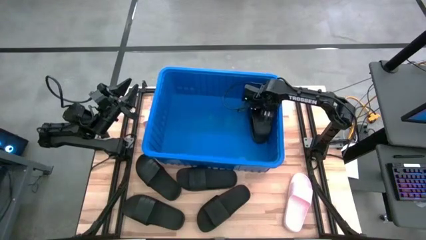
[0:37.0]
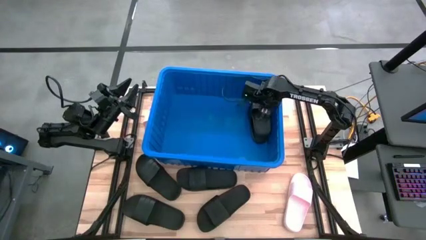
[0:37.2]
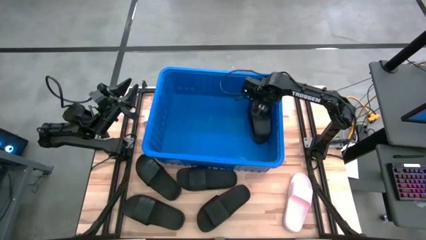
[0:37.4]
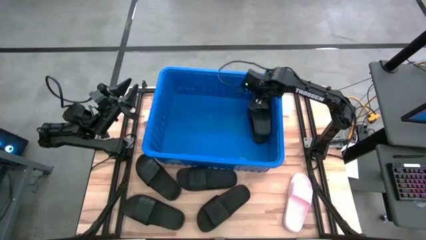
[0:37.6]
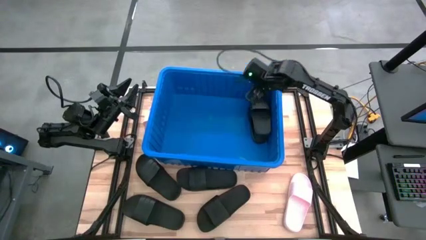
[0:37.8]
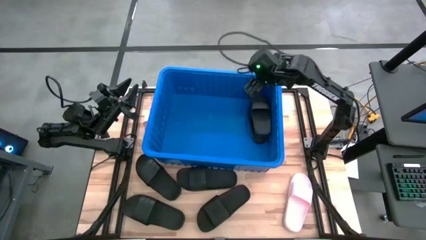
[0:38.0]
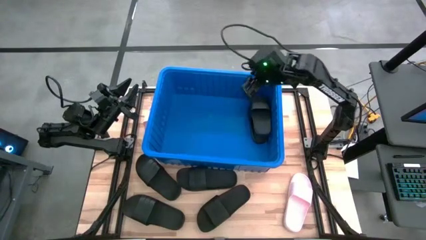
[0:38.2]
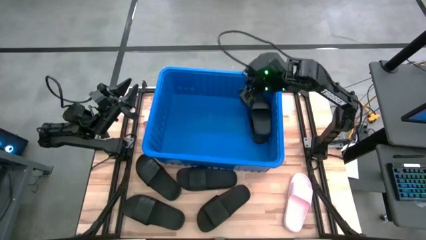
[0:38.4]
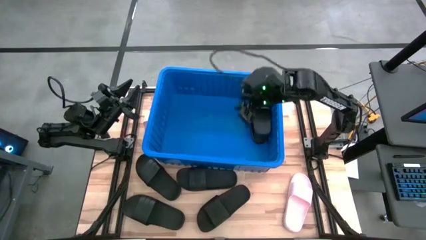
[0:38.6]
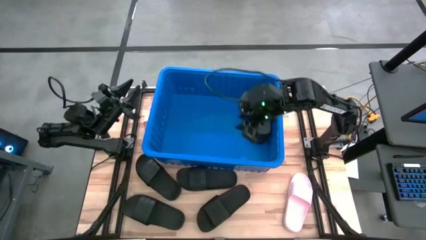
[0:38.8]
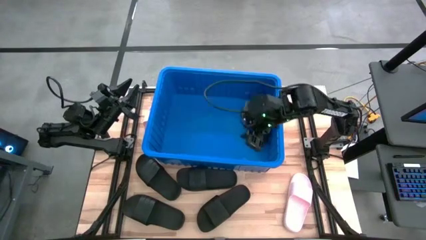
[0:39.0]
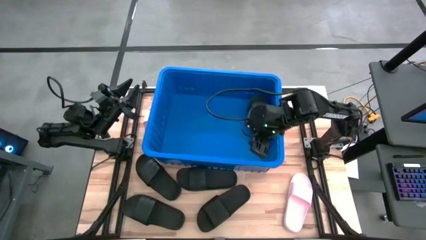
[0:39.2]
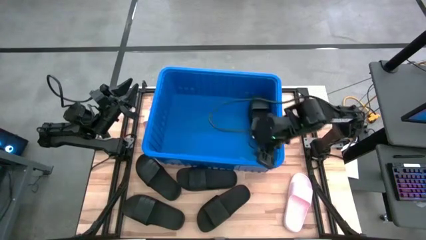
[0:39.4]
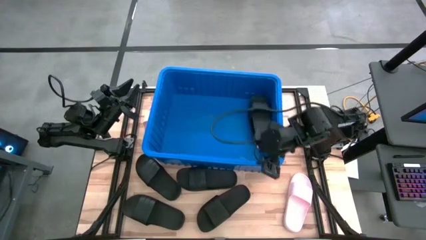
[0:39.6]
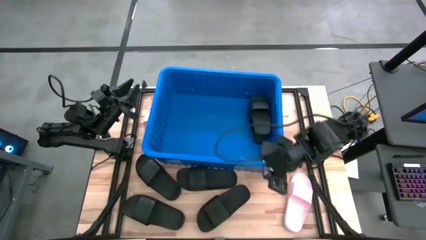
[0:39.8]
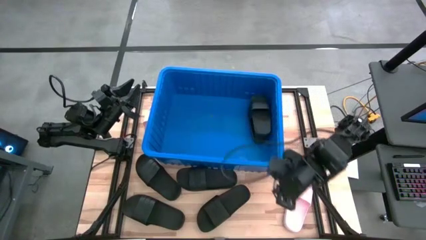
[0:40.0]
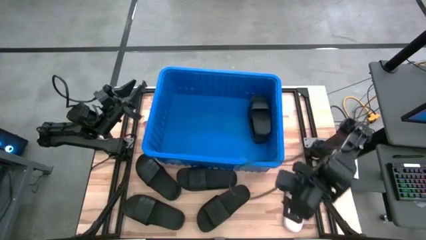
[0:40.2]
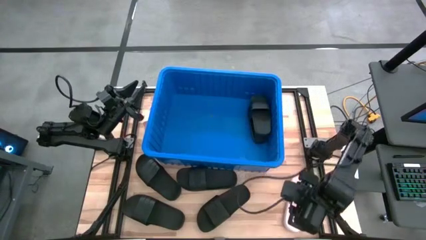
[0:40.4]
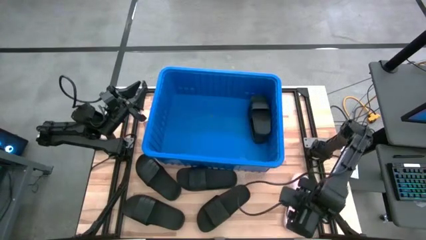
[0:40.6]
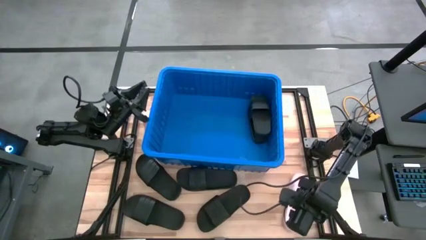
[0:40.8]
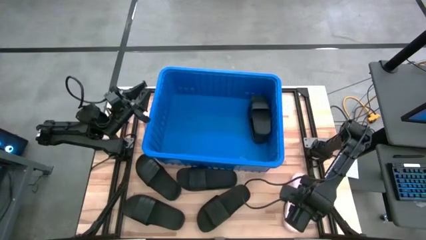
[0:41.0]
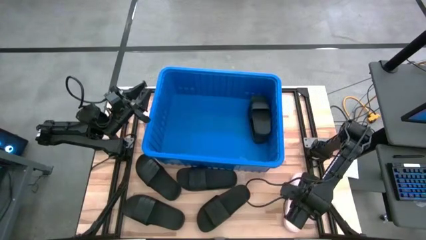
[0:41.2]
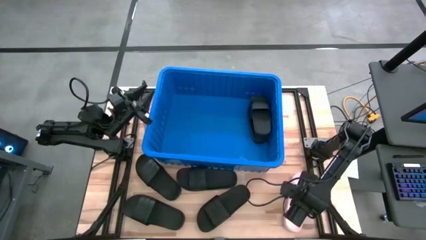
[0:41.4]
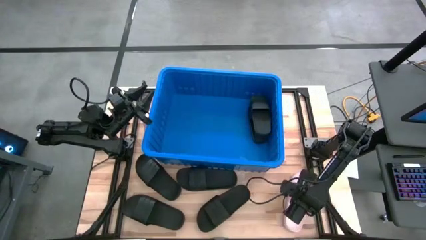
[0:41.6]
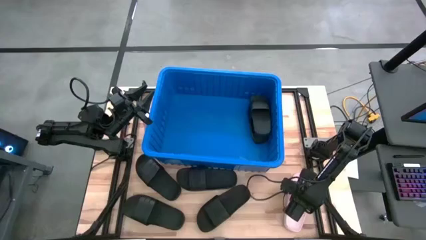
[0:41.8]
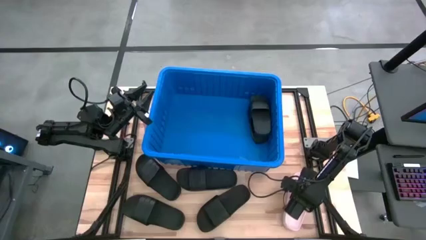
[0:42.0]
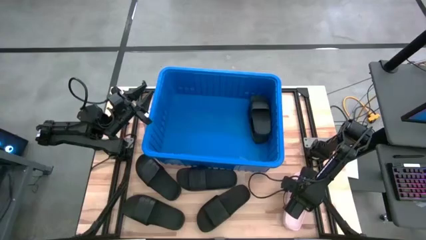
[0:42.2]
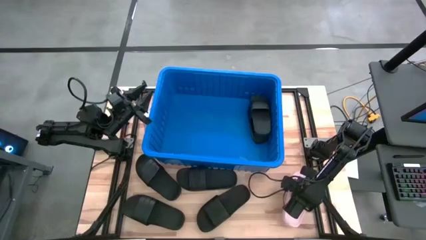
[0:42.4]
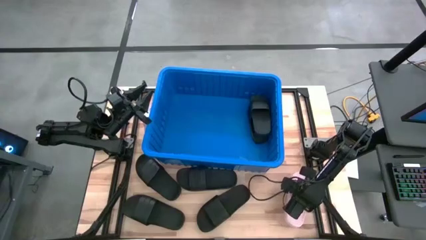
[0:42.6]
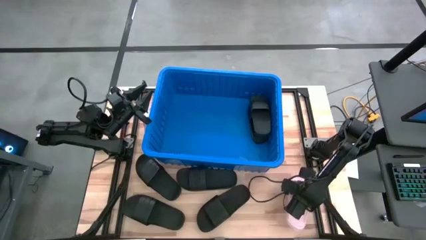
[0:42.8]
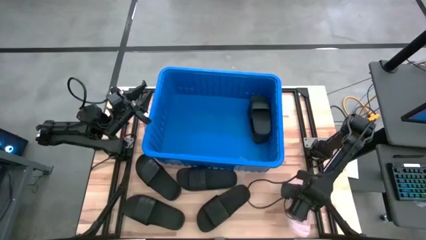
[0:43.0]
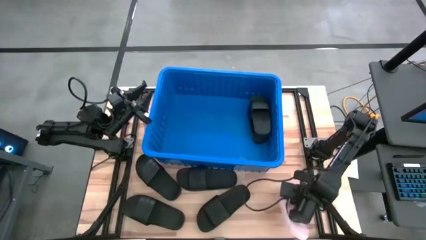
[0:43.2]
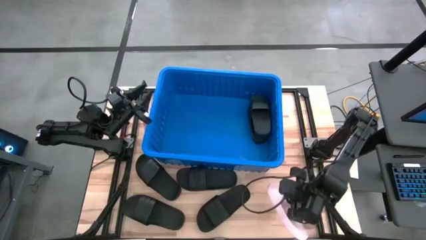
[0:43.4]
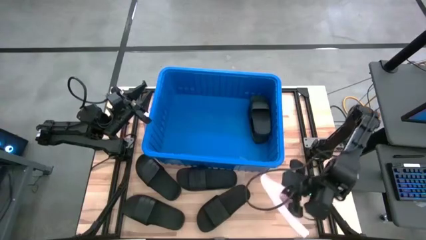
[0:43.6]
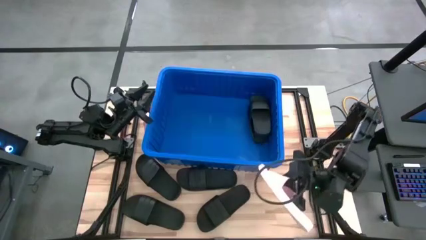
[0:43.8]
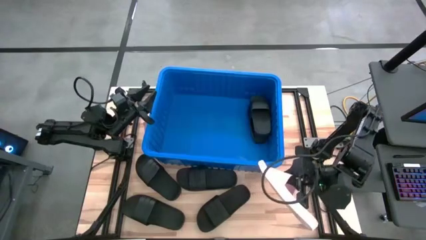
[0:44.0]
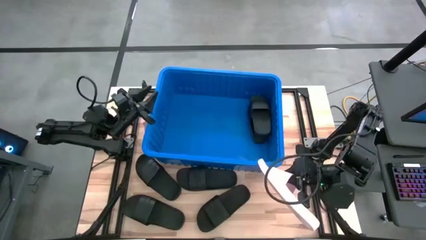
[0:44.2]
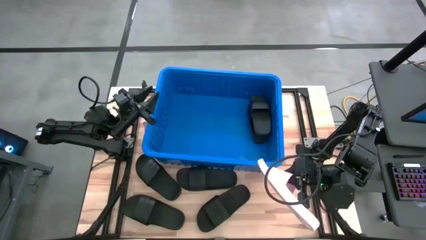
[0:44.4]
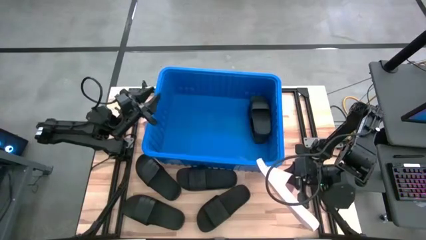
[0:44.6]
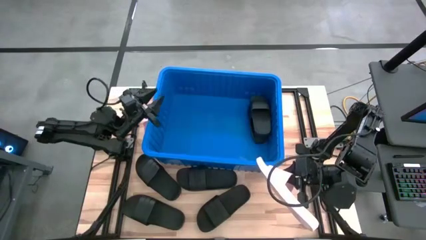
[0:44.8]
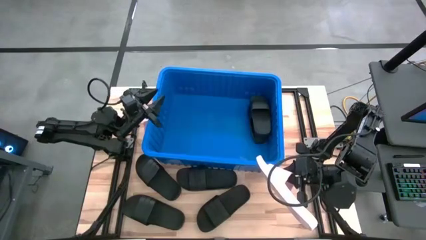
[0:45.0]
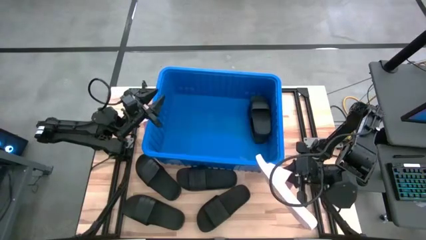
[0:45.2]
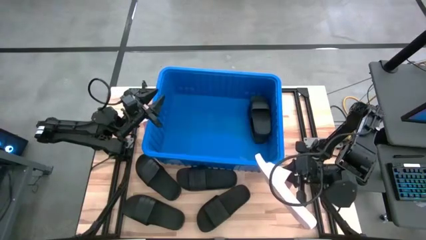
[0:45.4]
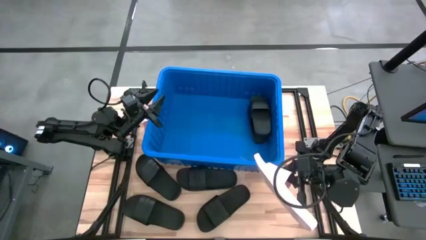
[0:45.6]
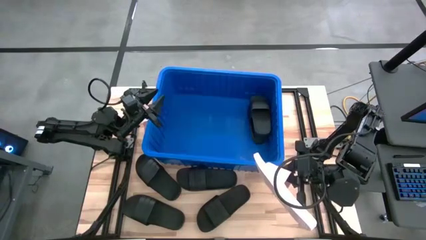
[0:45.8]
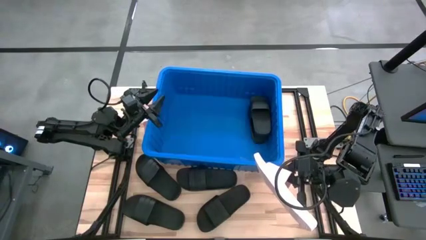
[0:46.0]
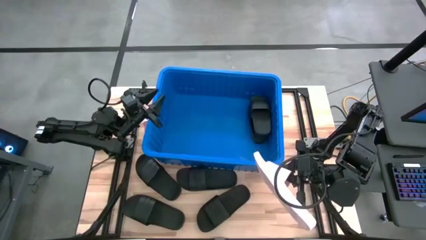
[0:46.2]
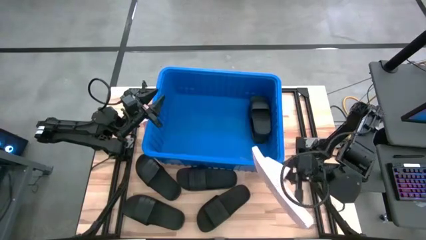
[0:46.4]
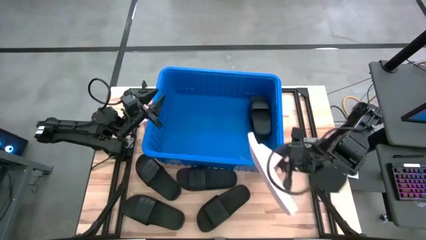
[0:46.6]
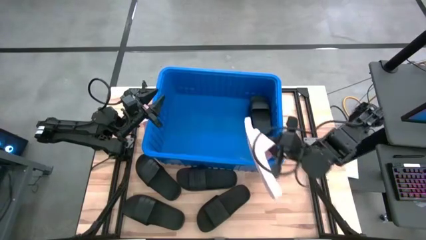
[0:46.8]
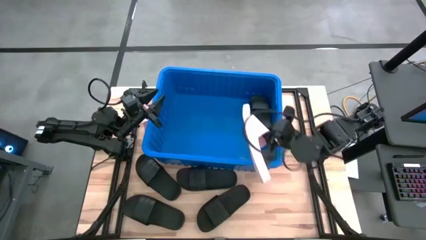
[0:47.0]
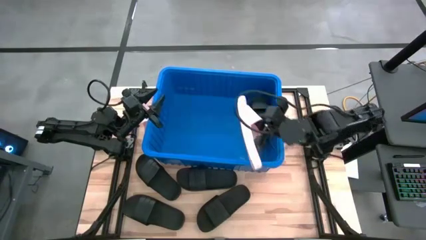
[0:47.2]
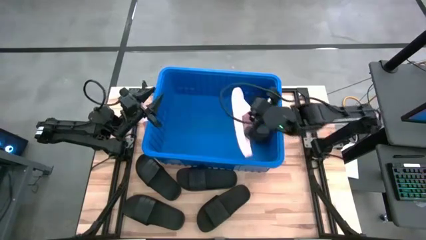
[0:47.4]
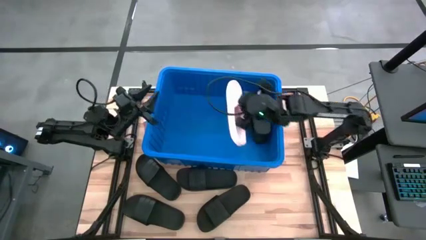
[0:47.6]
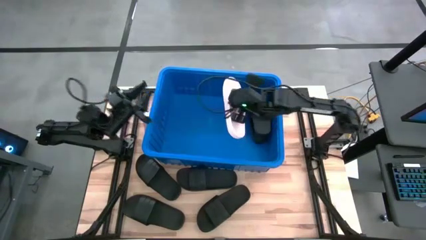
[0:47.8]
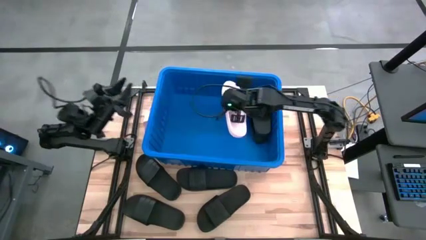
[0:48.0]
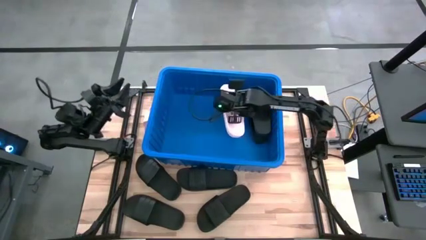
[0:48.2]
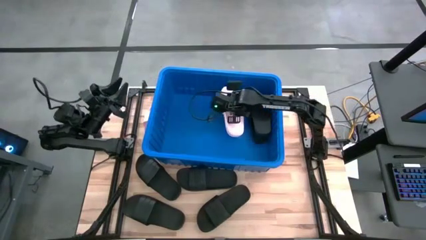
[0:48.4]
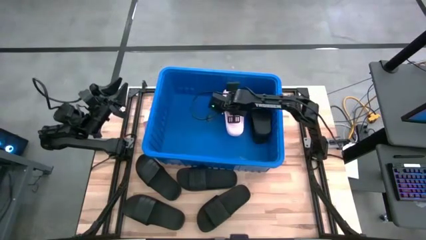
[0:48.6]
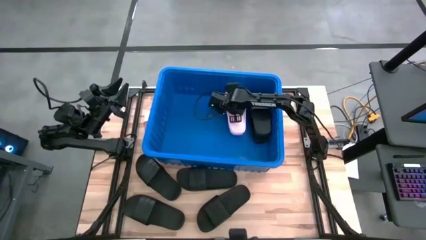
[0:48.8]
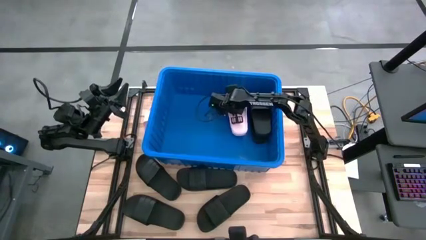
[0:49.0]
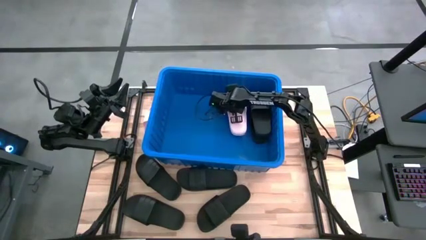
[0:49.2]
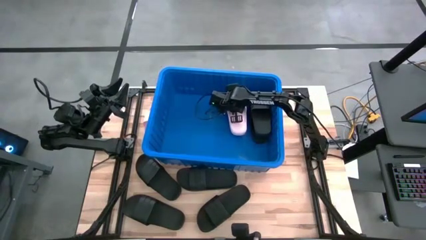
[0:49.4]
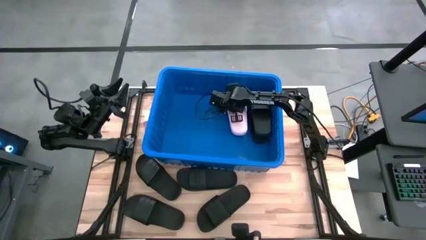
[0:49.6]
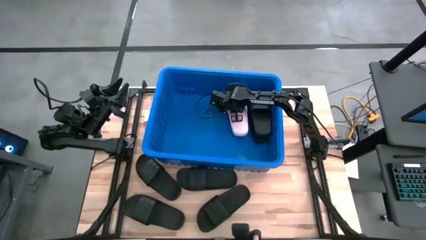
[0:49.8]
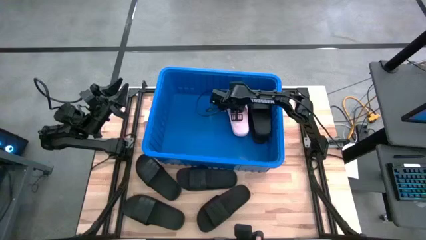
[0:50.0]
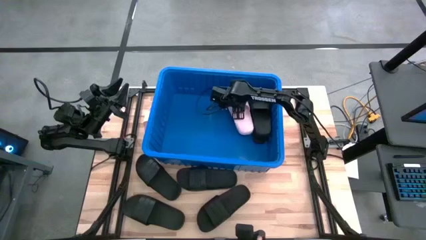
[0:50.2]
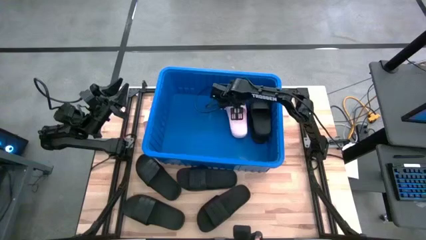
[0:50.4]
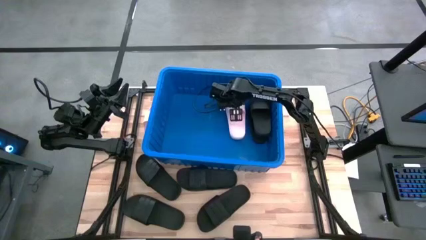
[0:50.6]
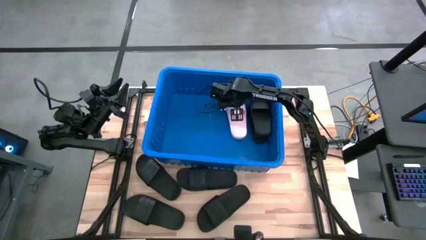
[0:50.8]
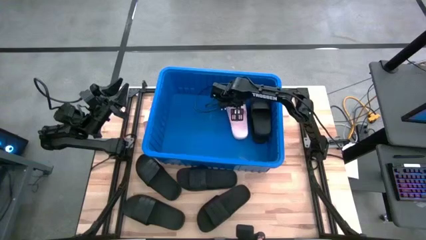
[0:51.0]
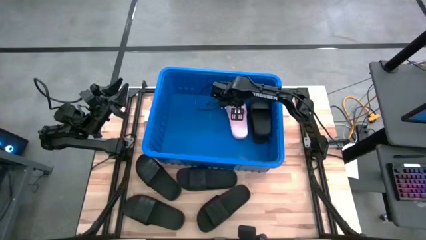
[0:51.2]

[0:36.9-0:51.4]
Task: Pick and place slides into bin
Put the pink slide into the blue bin
